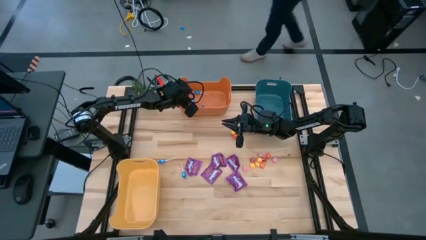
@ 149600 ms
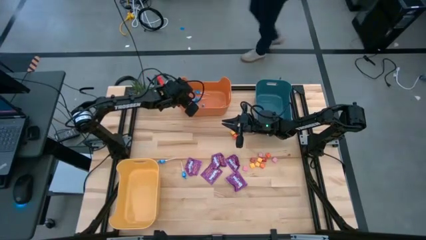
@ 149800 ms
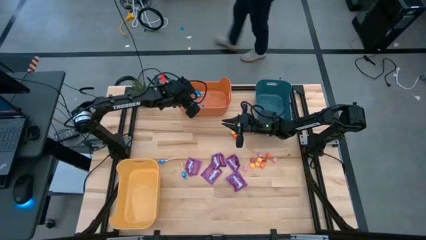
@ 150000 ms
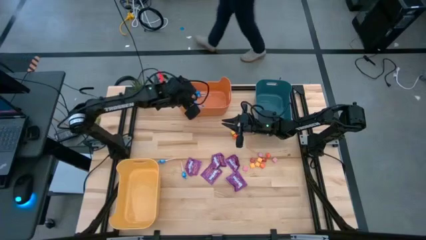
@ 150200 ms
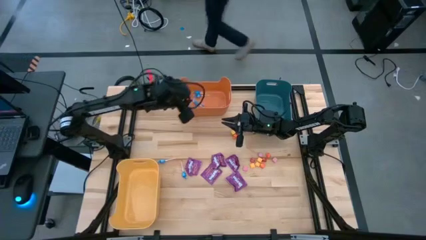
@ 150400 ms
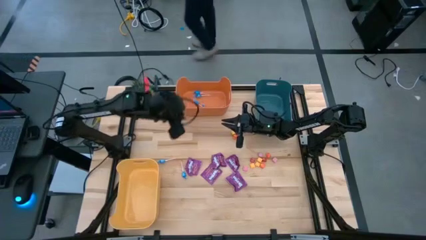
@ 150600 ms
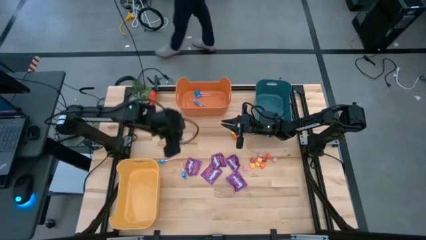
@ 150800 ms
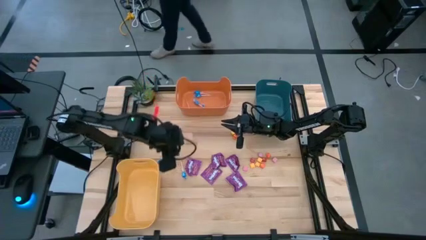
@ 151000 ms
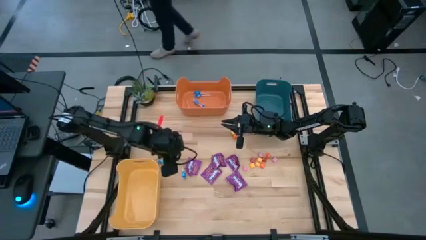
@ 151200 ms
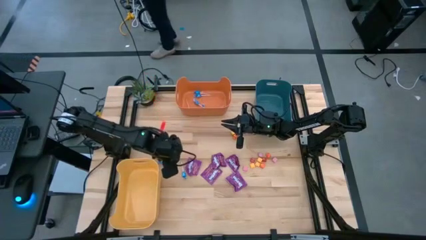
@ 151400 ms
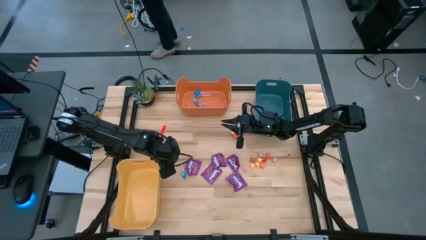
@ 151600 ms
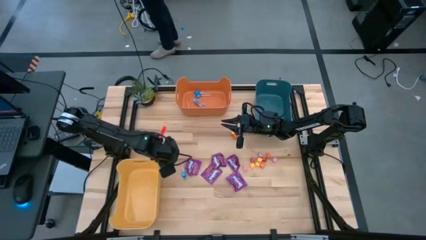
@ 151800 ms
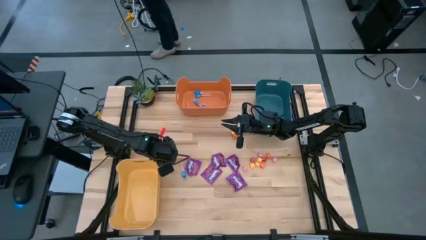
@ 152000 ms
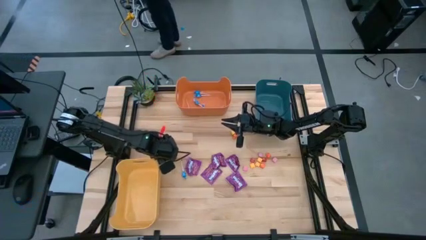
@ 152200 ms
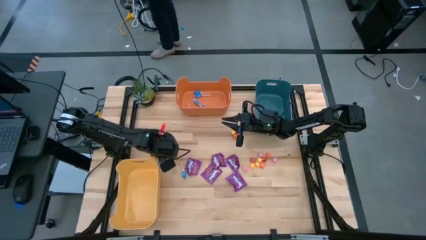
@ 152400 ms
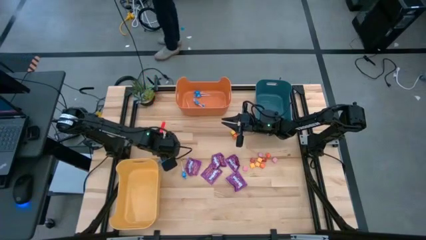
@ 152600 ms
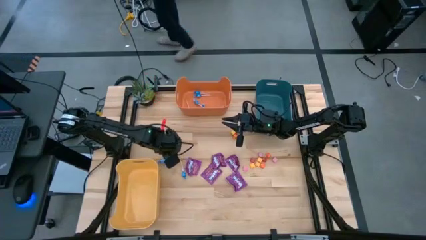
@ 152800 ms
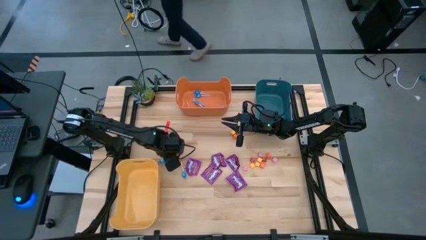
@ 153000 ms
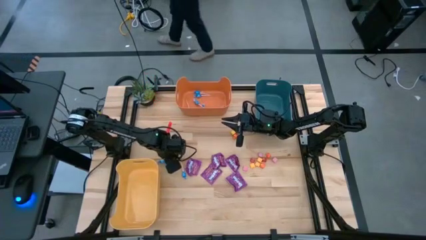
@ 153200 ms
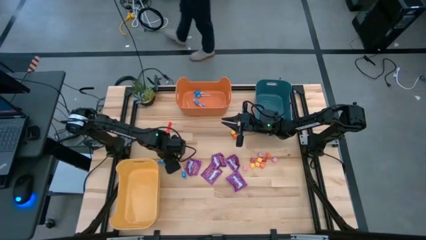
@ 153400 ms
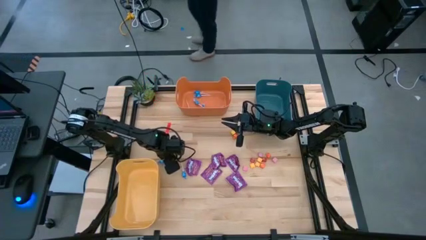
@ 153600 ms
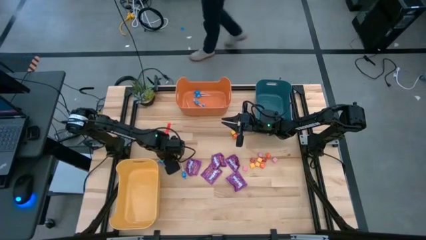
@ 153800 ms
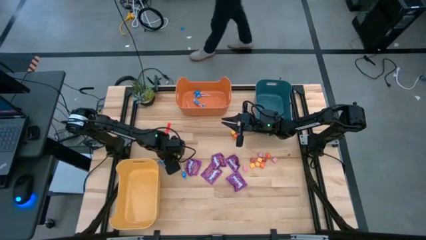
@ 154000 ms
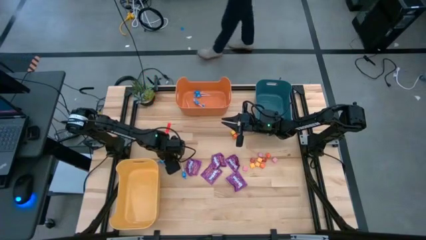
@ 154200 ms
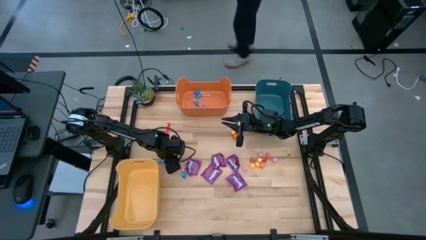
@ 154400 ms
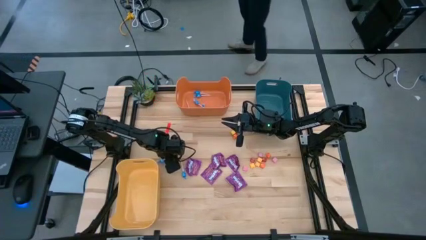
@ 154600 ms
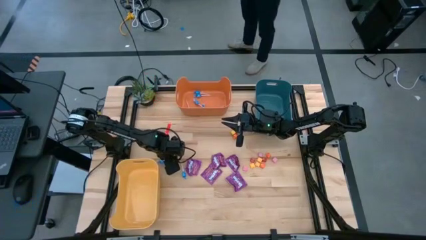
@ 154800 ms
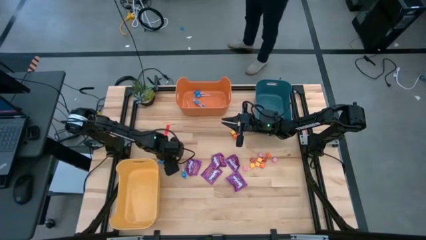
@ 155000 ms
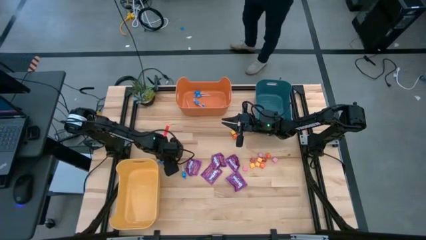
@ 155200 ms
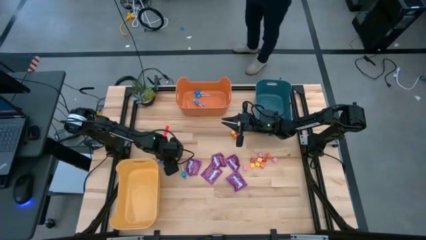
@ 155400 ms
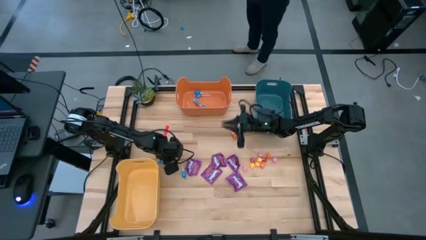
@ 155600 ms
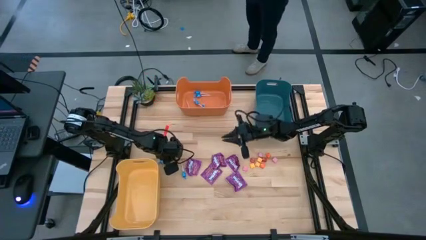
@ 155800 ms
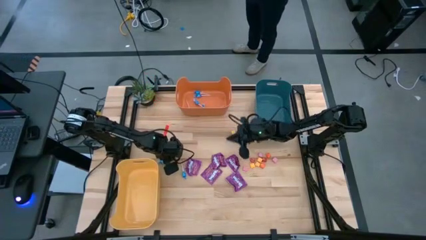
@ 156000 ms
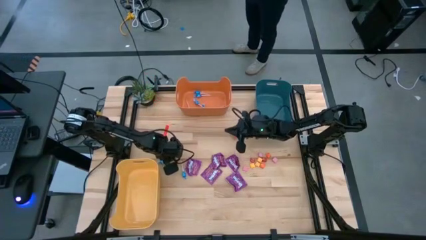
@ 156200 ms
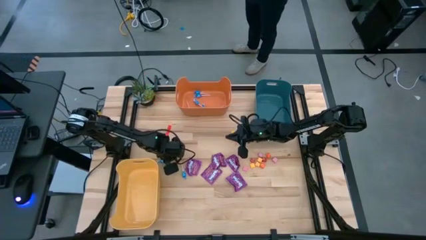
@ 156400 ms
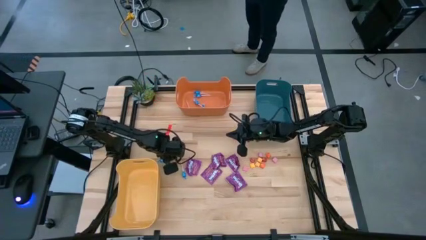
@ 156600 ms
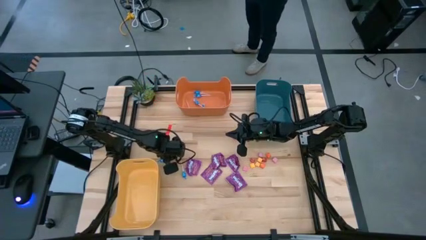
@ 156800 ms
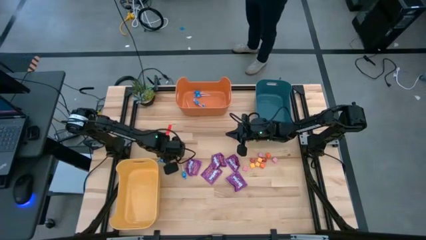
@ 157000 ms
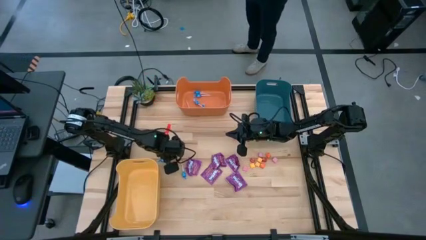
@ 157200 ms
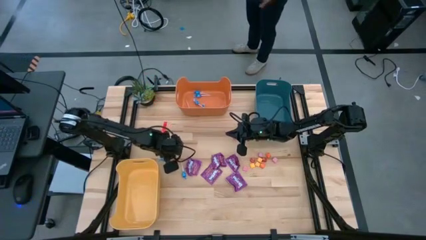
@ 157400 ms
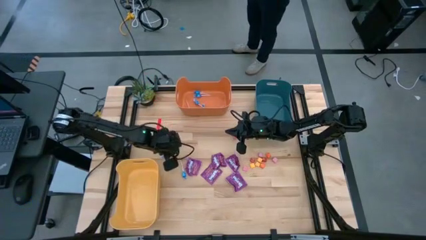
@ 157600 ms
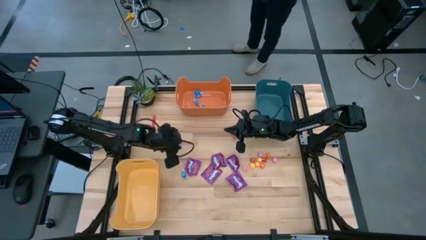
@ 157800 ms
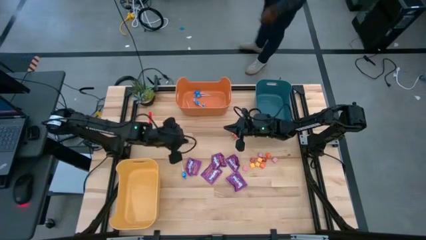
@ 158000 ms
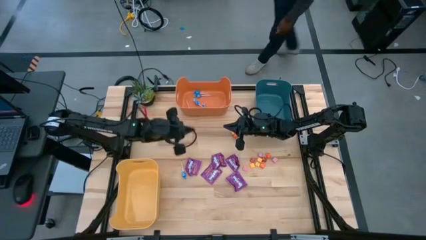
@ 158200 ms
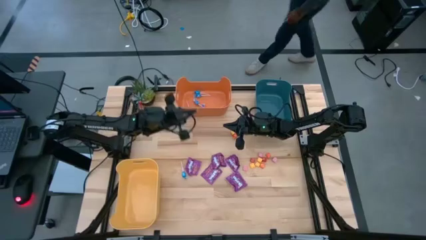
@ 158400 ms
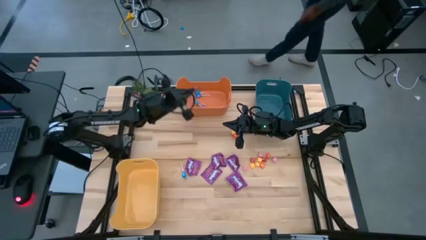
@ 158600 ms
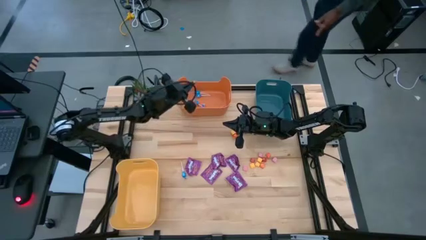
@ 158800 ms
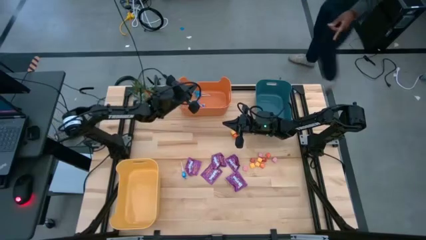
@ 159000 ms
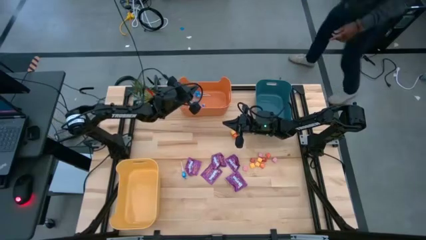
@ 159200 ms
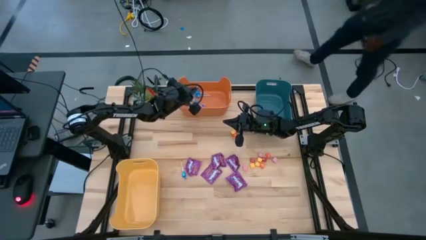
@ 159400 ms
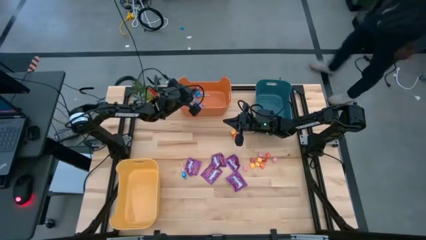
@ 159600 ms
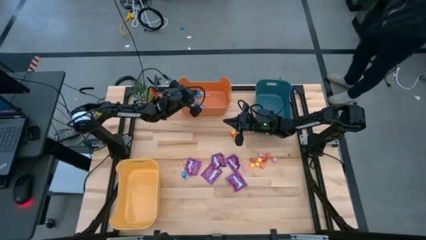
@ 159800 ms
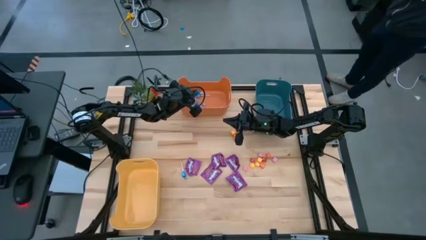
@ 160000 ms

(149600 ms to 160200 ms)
Task: Sort candy
Put the blue candy into the orange bin

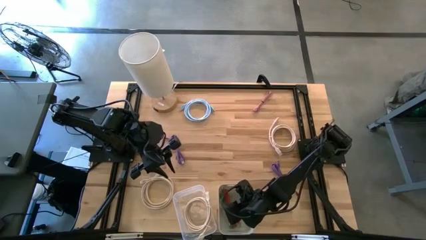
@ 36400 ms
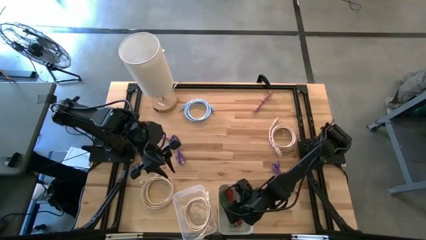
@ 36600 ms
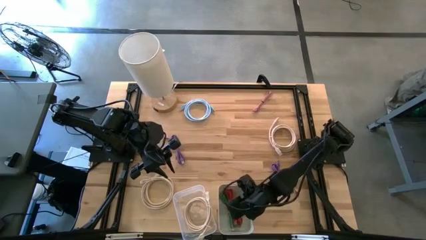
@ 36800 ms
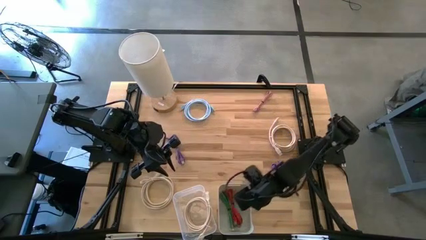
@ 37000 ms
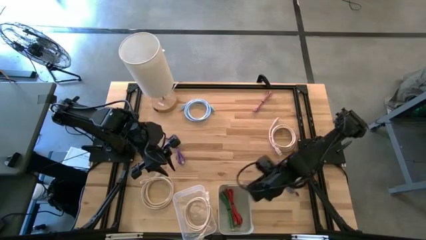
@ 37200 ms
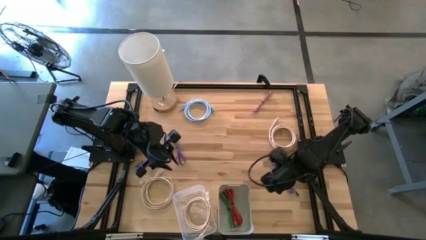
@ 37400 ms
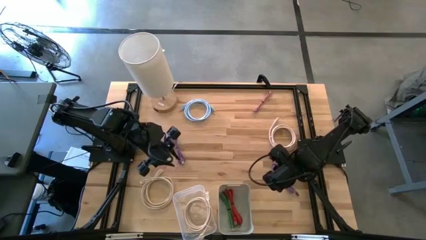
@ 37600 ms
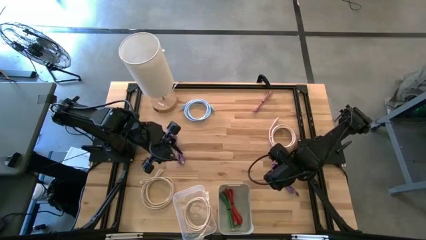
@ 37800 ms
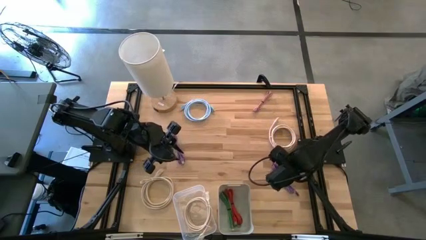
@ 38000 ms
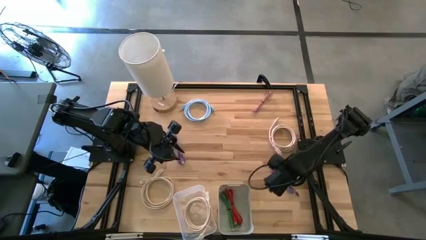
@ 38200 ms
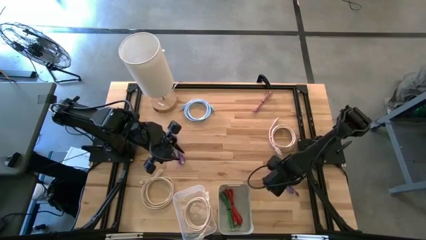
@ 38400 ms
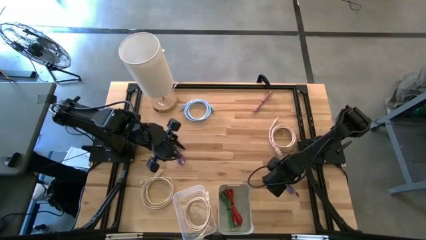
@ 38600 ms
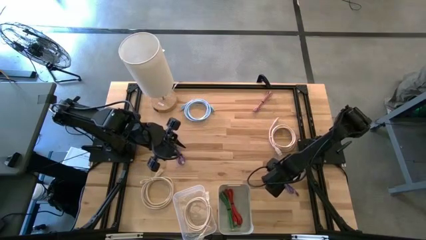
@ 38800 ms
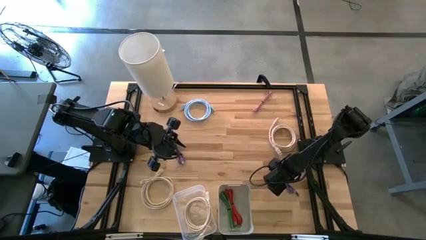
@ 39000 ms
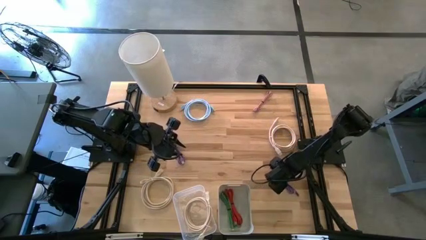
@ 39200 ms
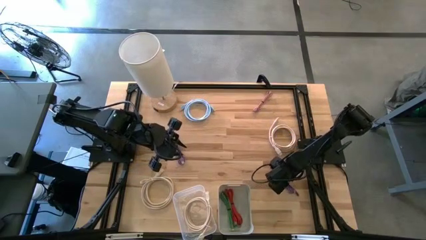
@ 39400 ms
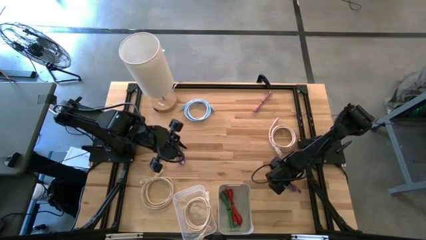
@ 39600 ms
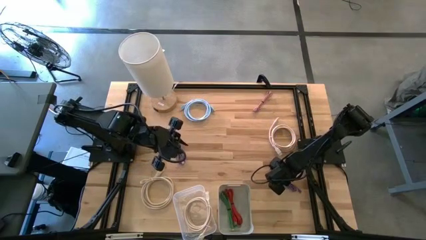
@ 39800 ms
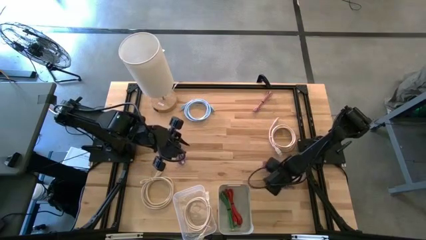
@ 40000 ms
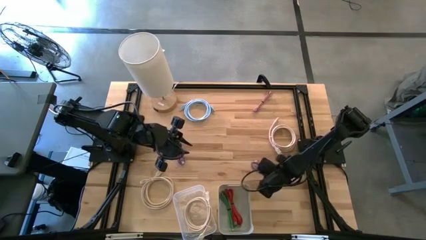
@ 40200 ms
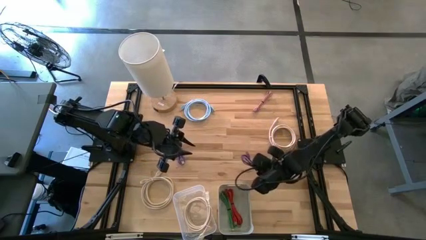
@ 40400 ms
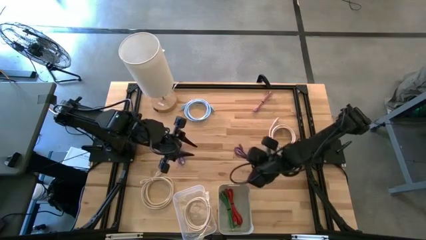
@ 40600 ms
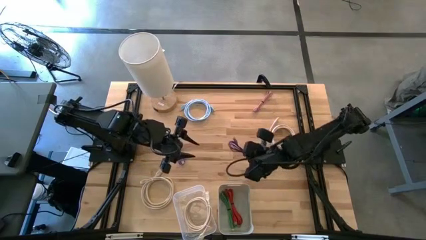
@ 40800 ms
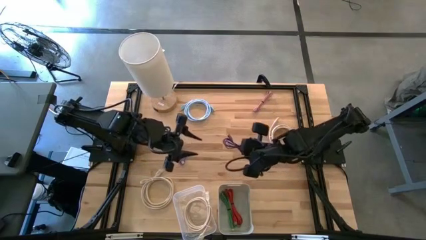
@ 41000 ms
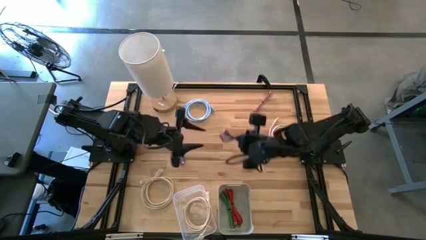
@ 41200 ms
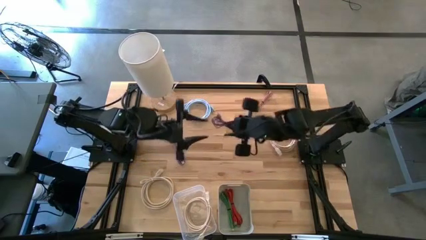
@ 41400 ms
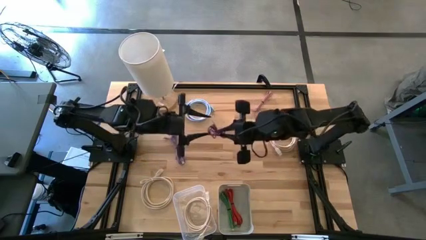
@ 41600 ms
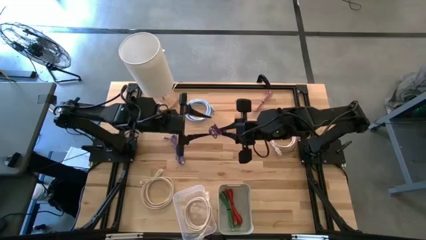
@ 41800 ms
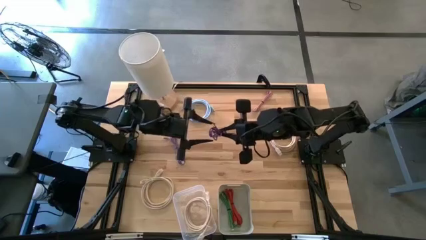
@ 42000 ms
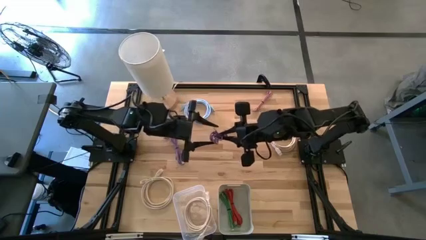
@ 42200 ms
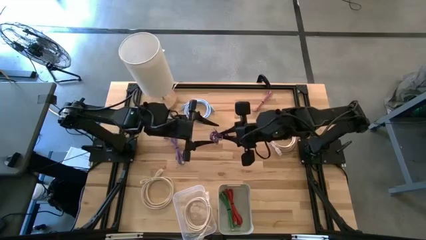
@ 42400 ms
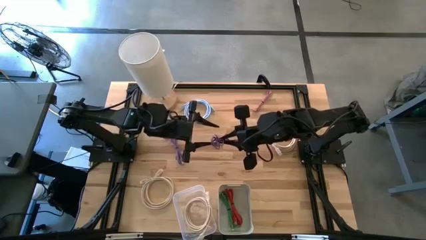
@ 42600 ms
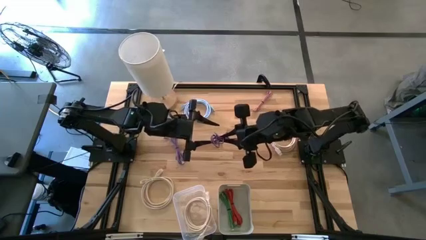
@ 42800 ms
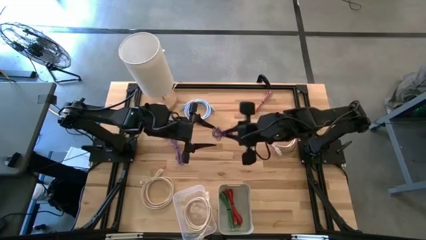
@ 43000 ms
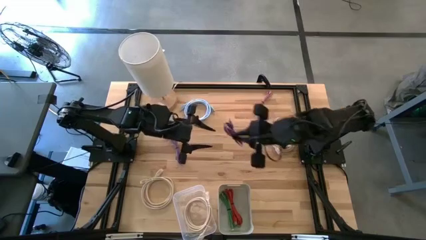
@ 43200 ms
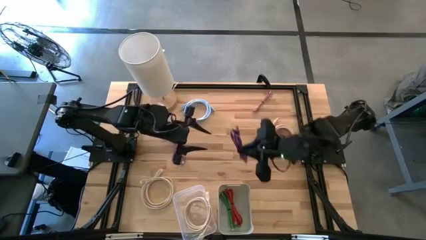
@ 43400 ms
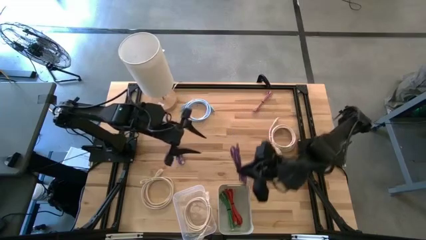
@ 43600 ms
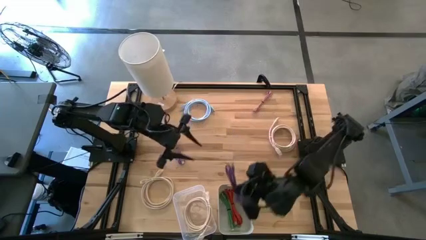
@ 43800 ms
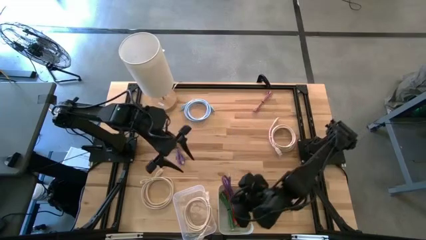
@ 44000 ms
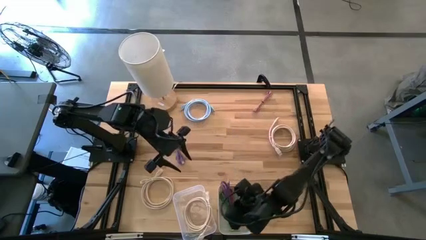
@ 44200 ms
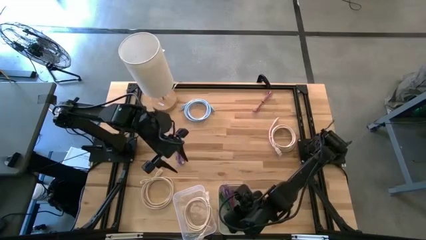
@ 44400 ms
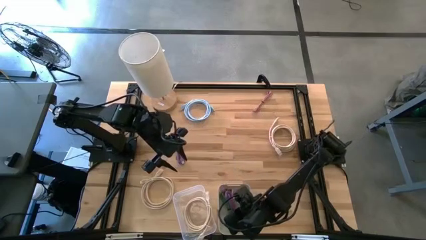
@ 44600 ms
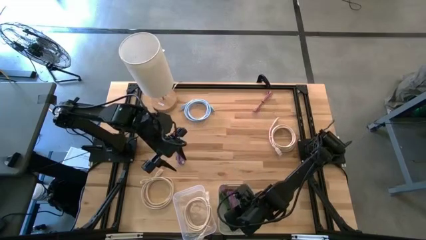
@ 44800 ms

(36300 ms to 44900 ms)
Task: Pick & Place USB Port
Put the right purple USB cable into the white bin
